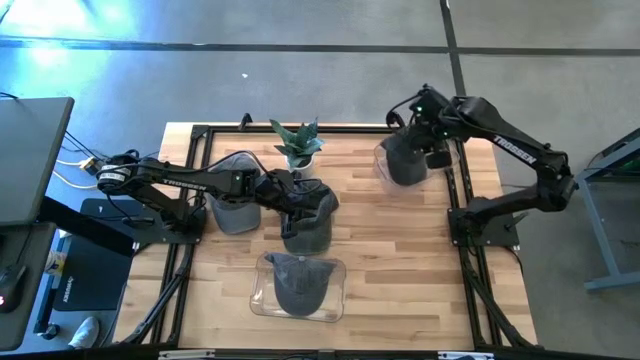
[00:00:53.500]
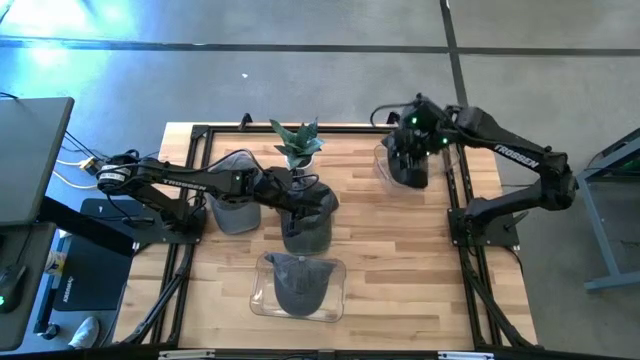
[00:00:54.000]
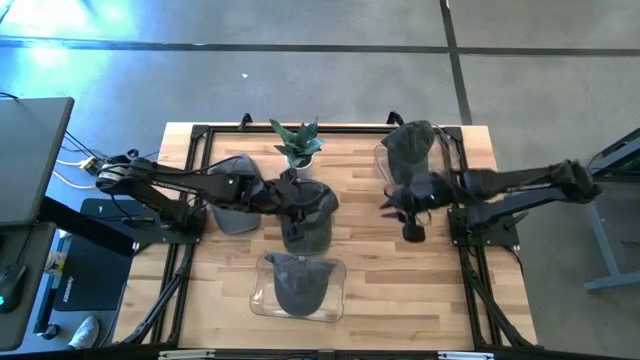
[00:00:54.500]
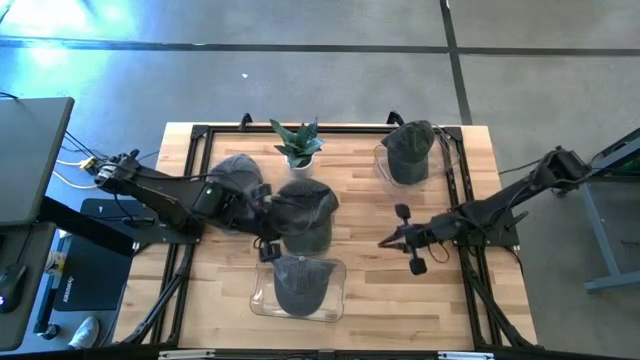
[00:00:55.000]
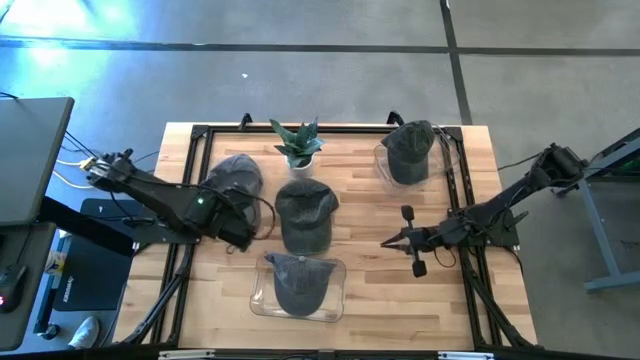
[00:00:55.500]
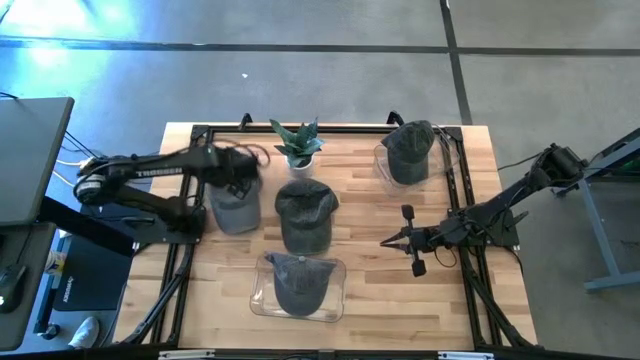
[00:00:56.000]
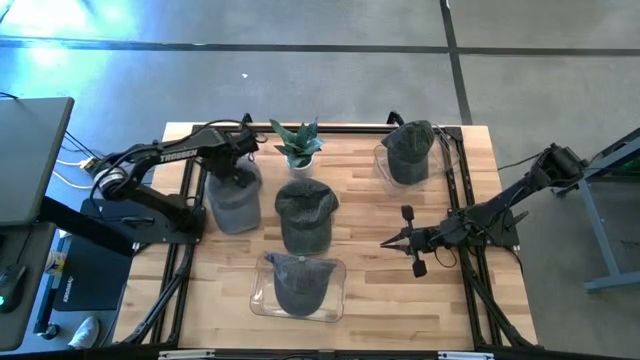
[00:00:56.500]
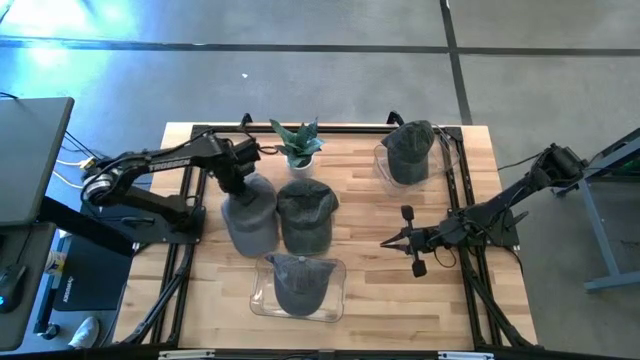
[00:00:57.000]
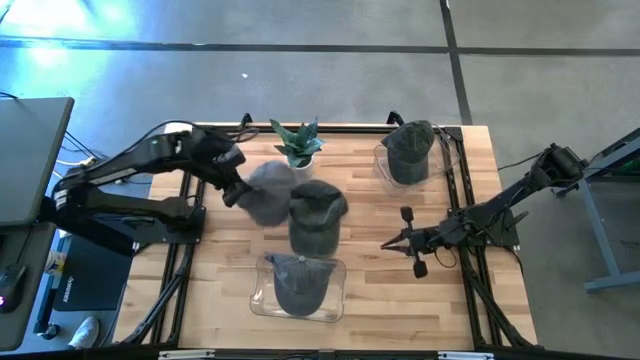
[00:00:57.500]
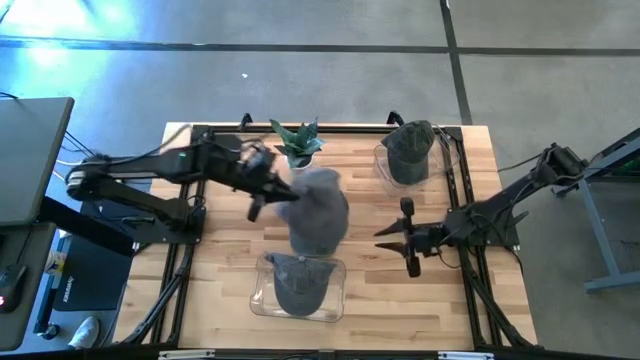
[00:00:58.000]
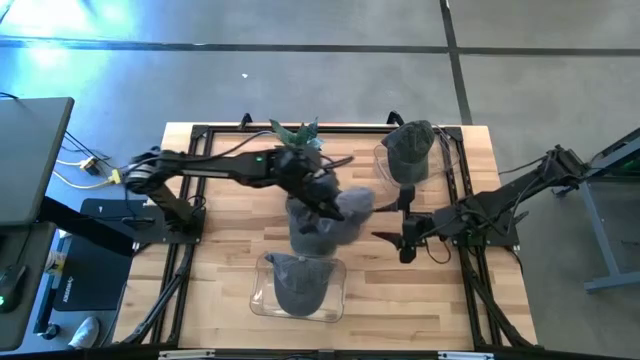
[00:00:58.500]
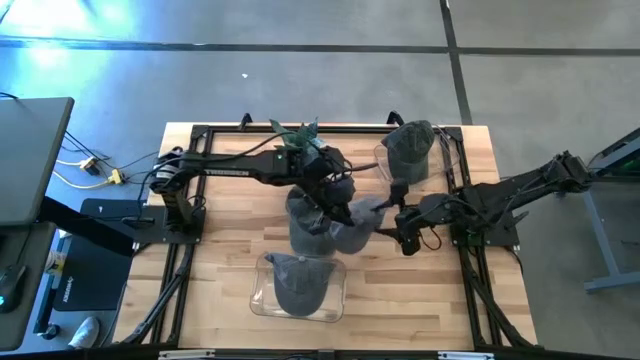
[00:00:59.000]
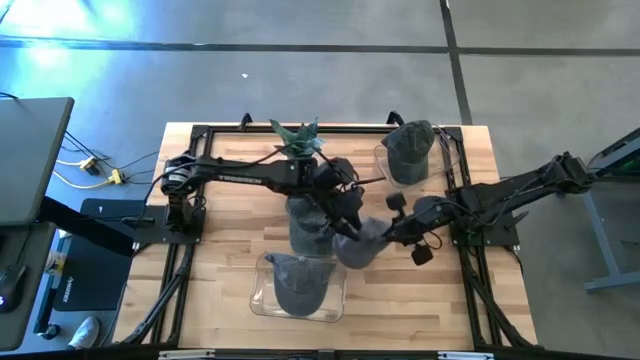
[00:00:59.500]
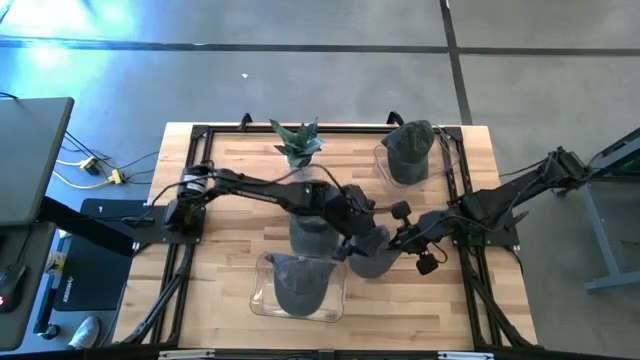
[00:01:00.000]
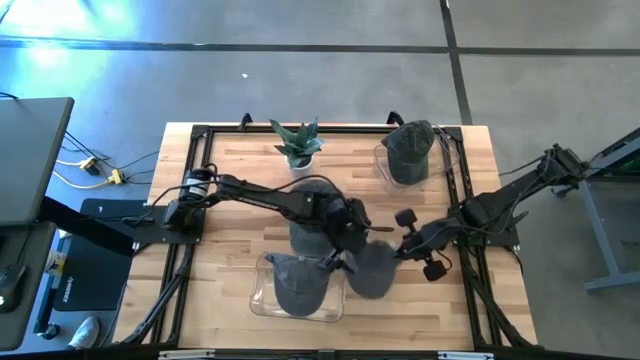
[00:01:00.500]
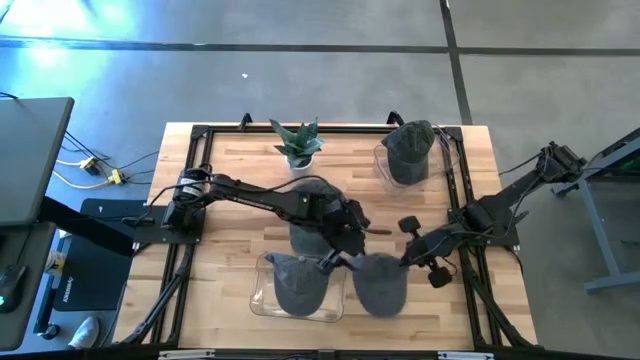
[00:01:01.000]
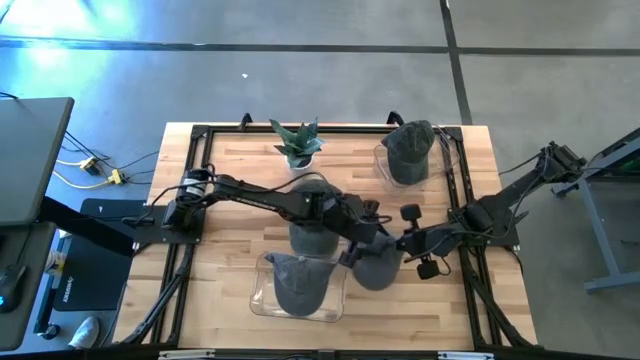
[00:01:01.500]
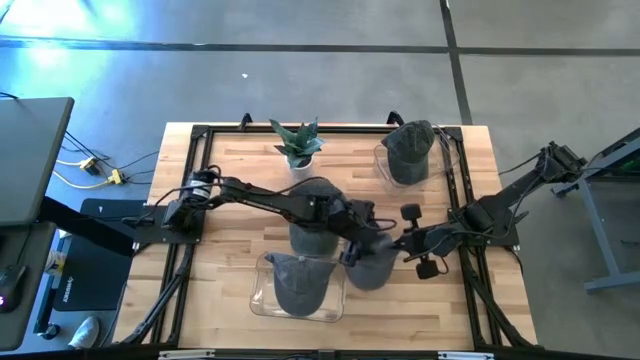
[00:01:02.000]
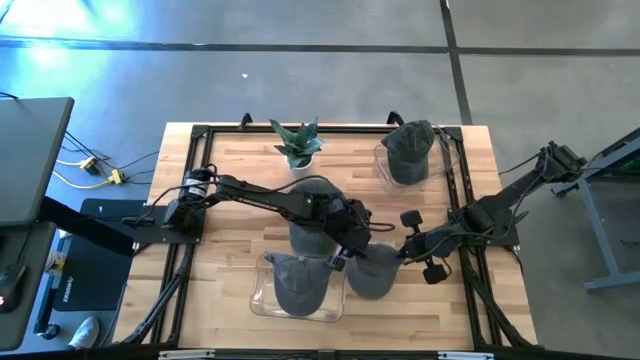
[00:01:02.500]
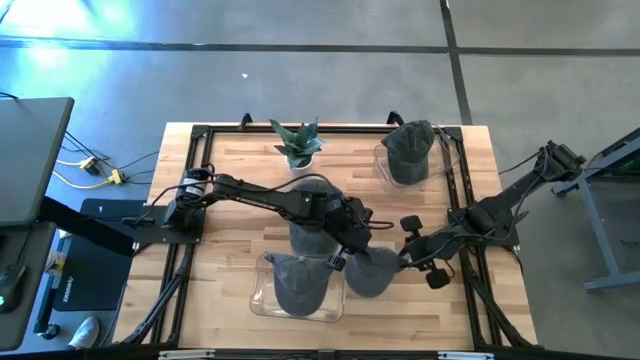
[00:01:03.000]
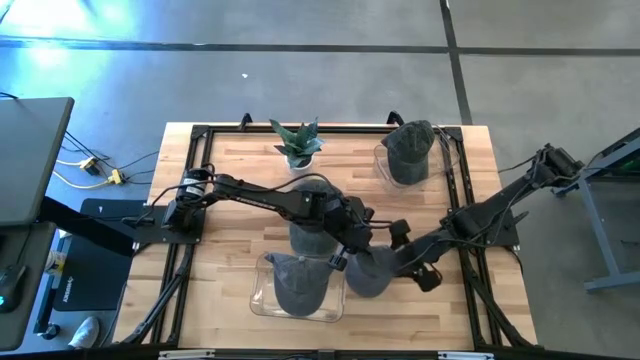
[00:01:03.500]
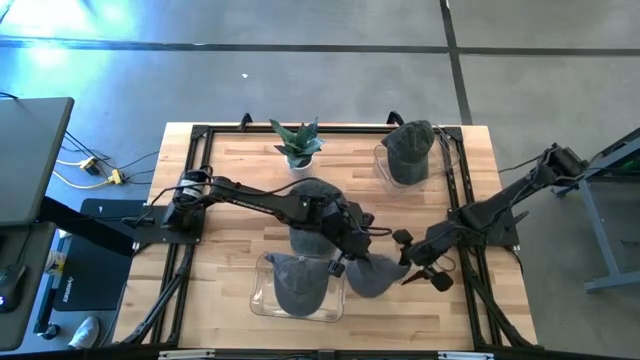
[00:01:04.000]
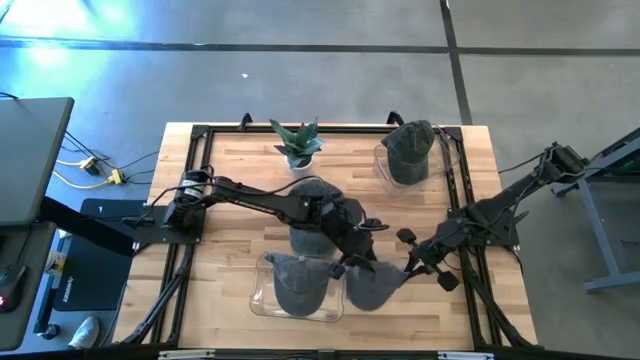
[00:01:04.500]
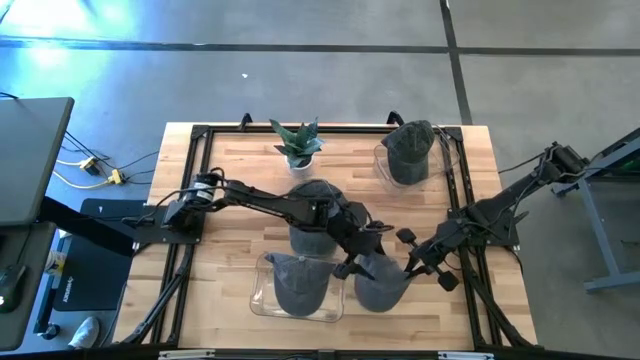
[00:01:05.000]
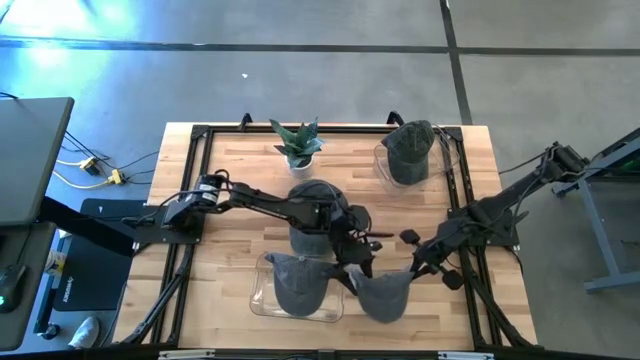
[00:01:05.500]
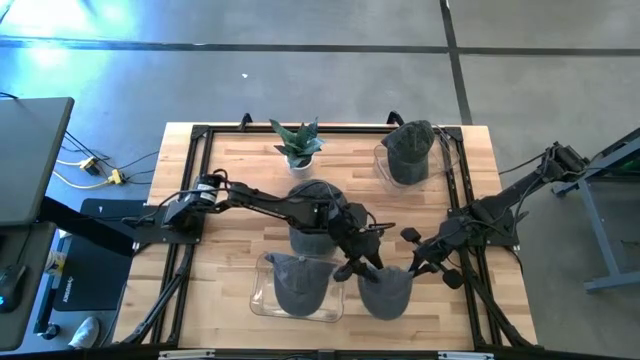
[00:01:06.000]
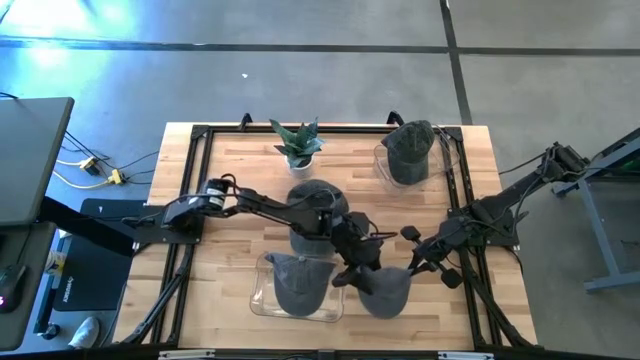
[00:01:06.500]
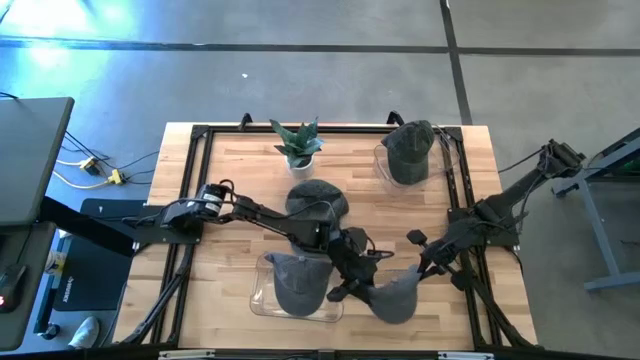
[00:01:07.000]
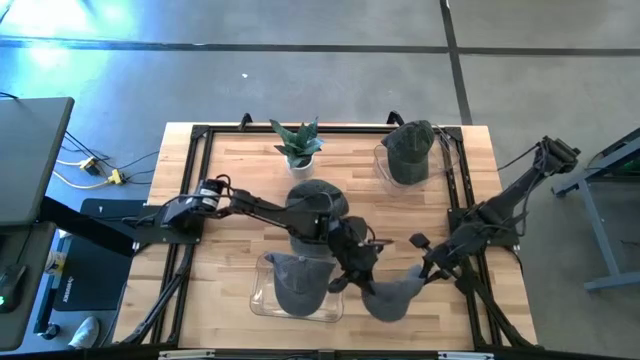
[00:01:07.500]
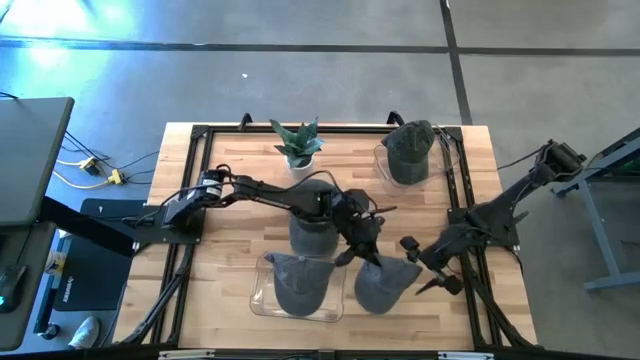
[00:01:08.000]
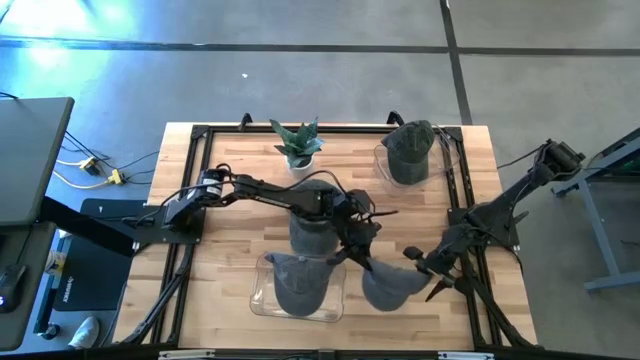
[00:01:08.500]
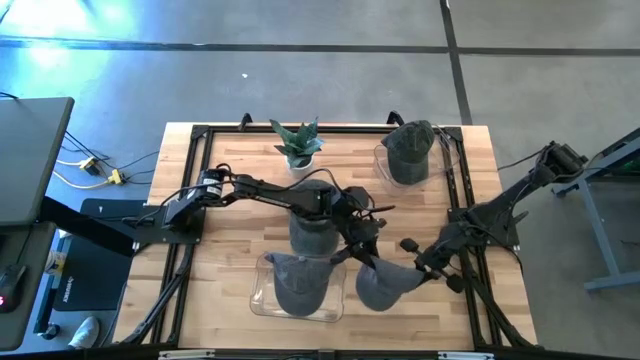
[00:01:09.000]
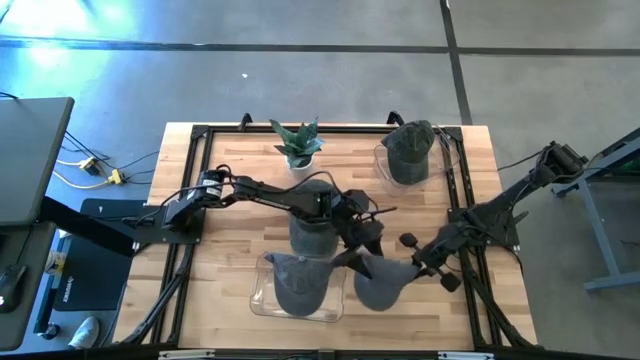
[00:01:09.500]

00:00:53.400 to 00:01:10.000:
Task: Pick & Place hat
Put the gray cap into the bottom transparent bin
